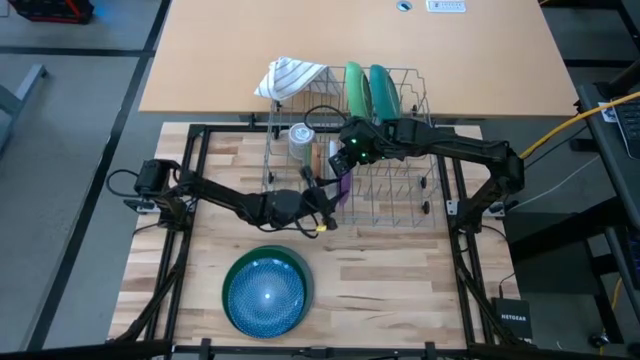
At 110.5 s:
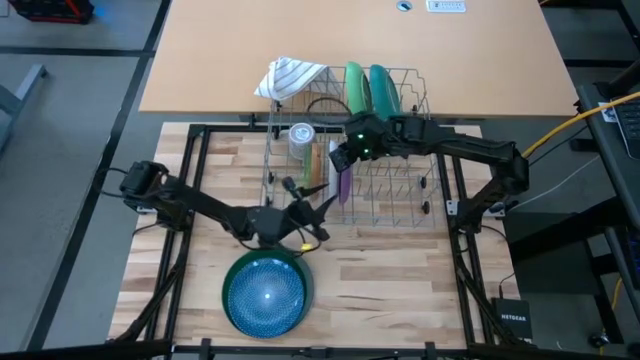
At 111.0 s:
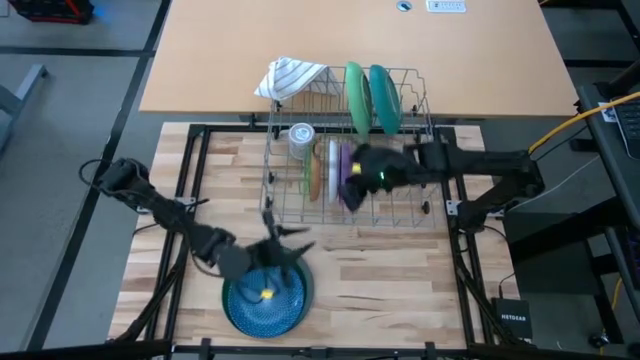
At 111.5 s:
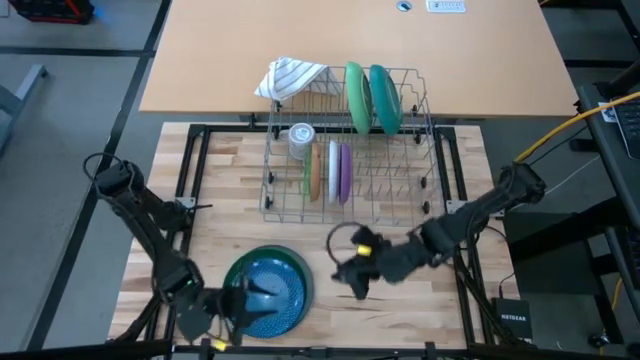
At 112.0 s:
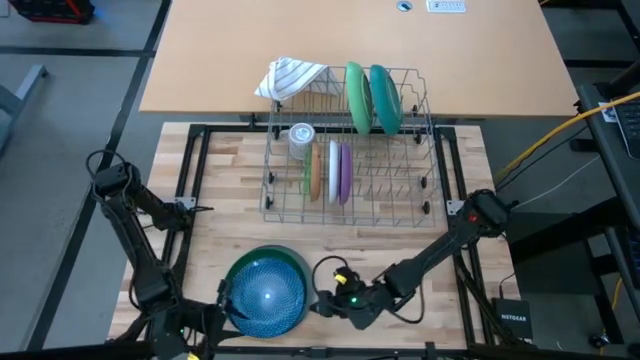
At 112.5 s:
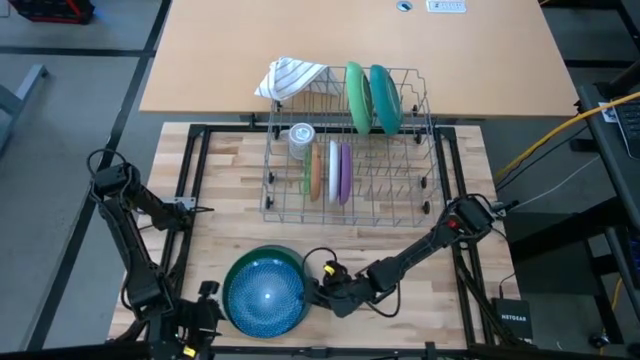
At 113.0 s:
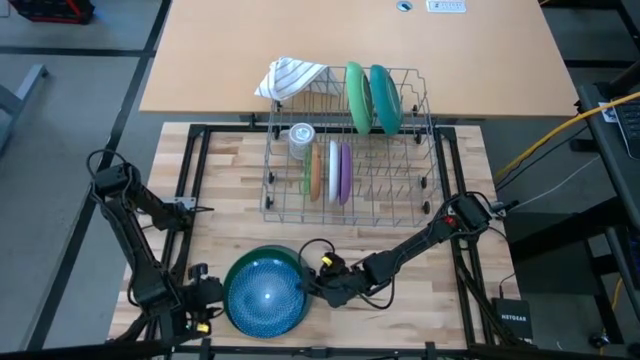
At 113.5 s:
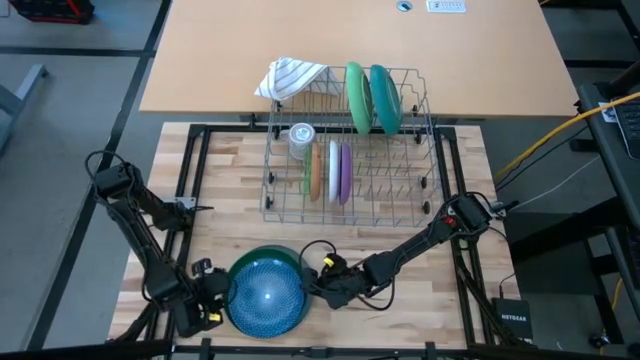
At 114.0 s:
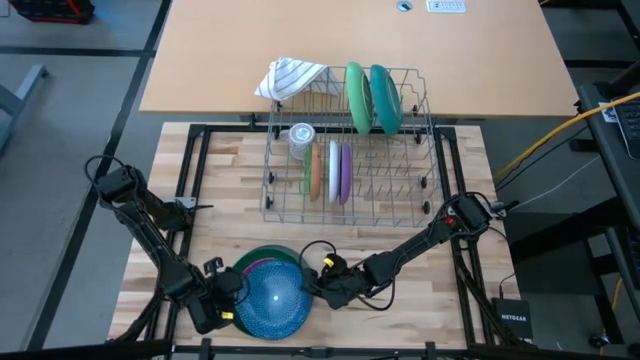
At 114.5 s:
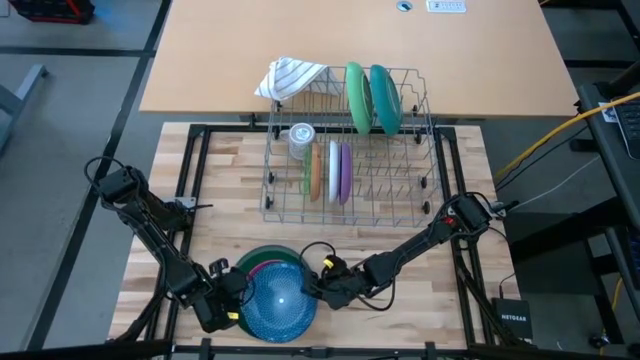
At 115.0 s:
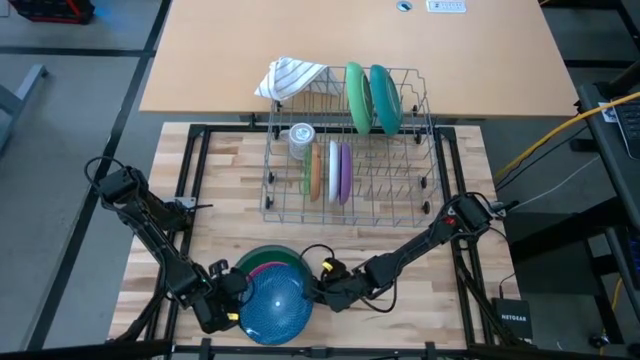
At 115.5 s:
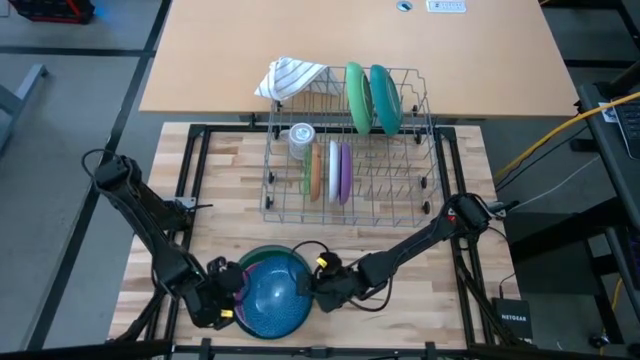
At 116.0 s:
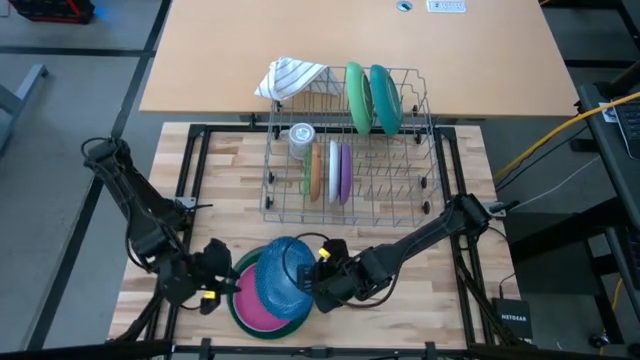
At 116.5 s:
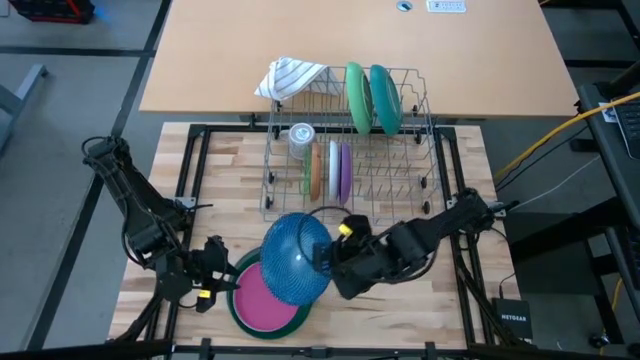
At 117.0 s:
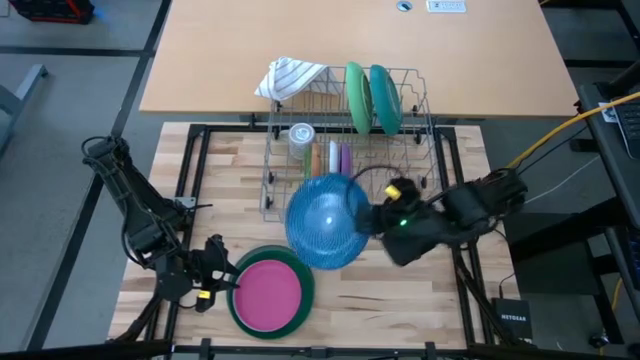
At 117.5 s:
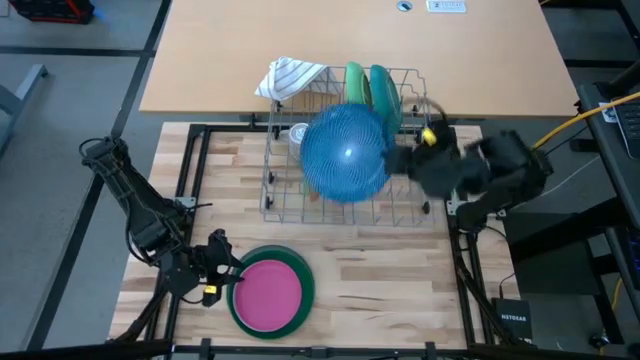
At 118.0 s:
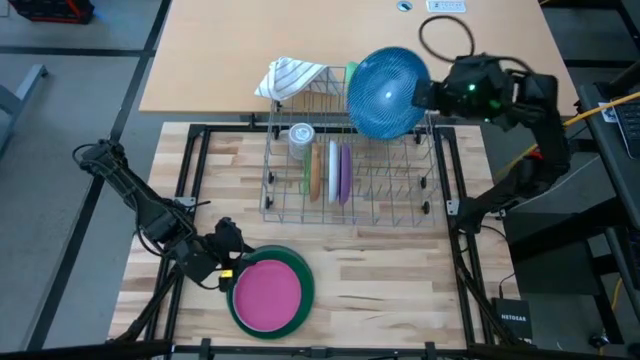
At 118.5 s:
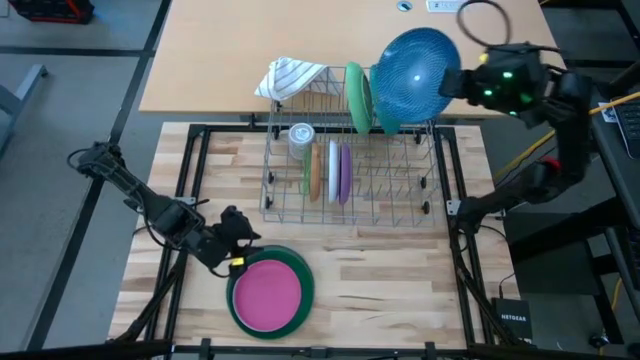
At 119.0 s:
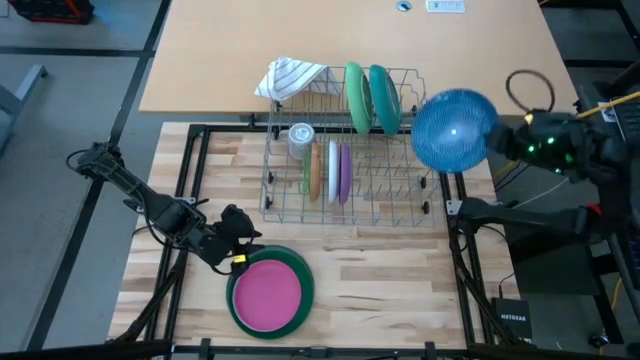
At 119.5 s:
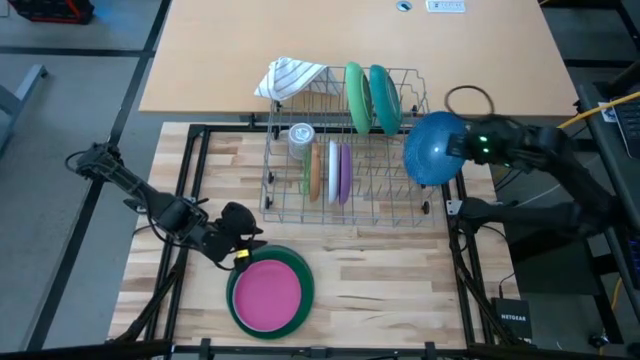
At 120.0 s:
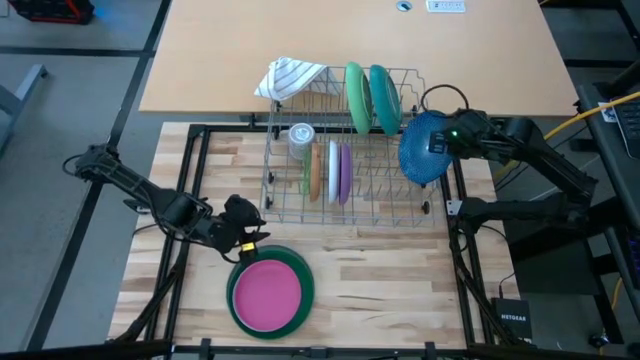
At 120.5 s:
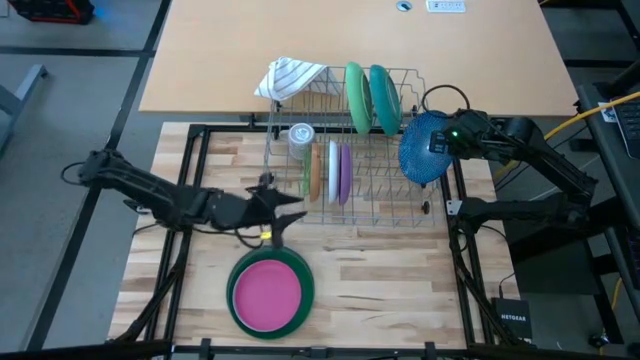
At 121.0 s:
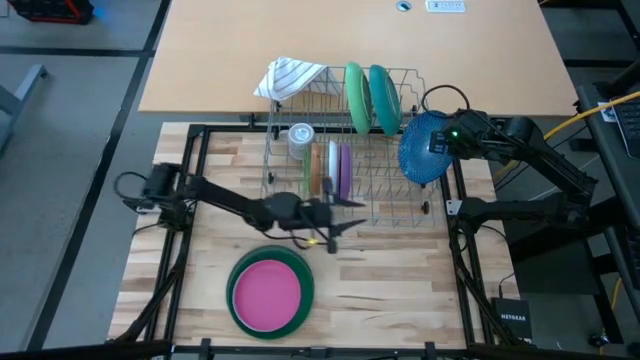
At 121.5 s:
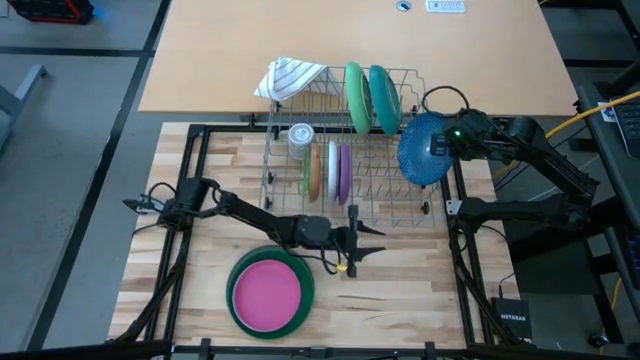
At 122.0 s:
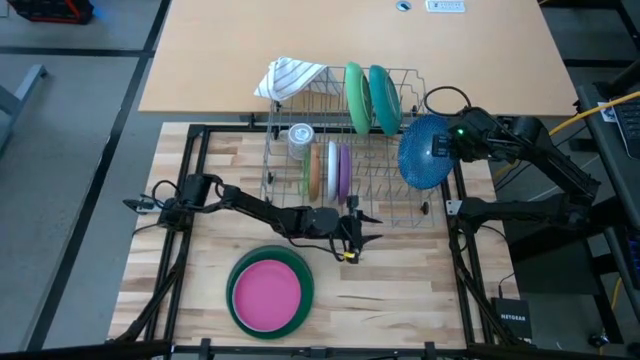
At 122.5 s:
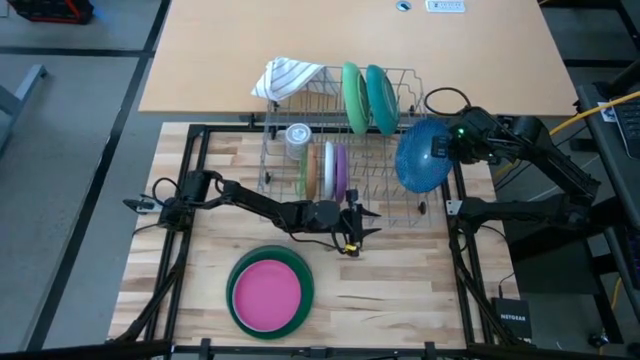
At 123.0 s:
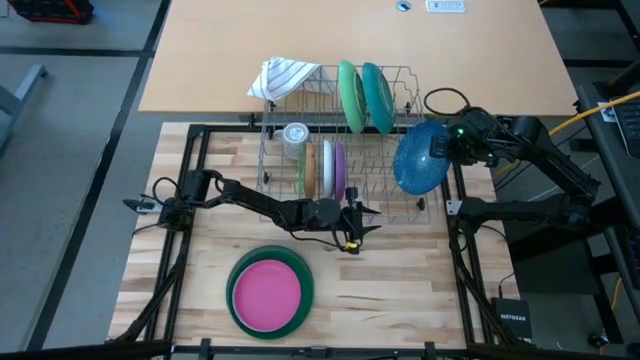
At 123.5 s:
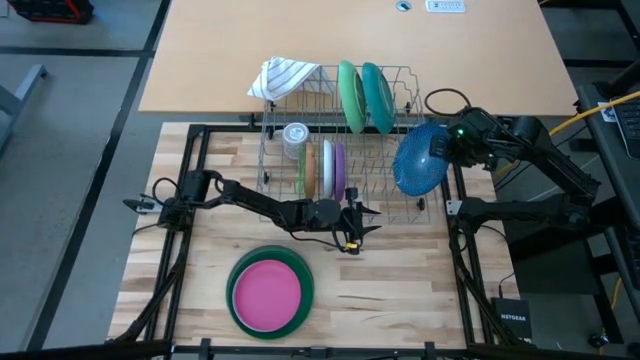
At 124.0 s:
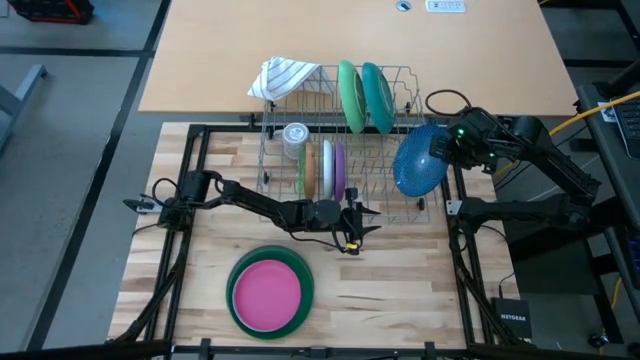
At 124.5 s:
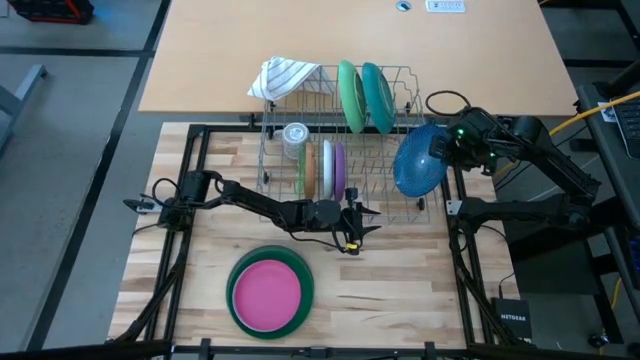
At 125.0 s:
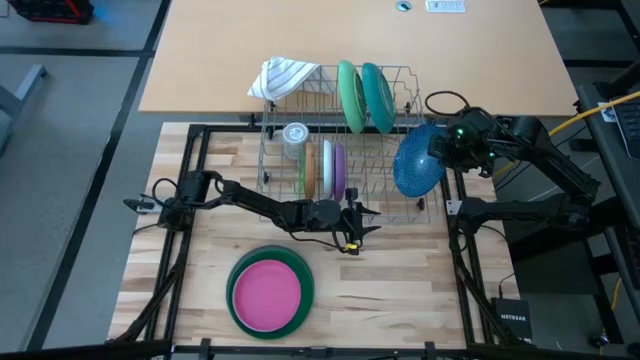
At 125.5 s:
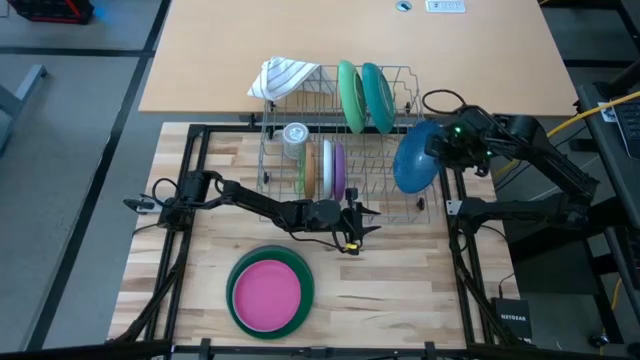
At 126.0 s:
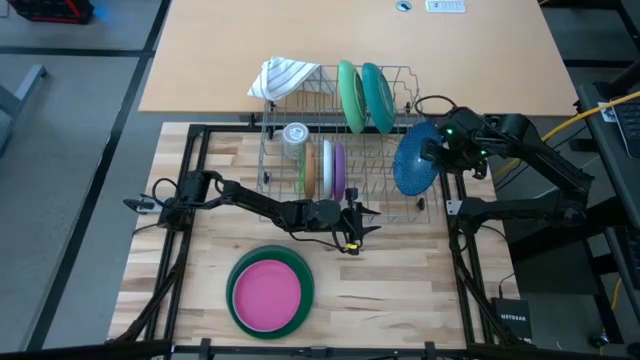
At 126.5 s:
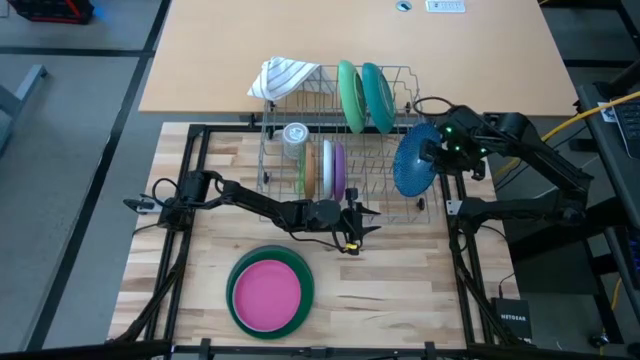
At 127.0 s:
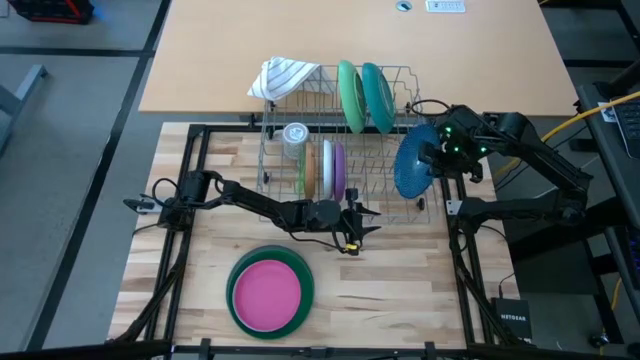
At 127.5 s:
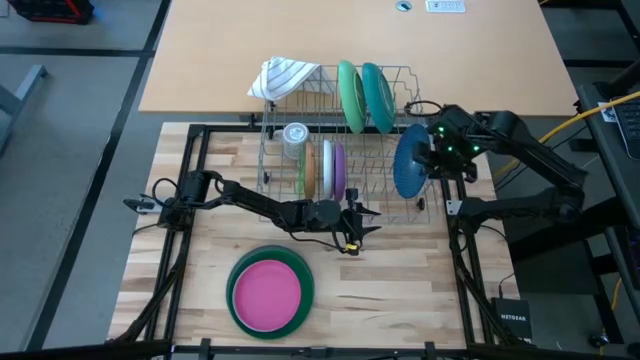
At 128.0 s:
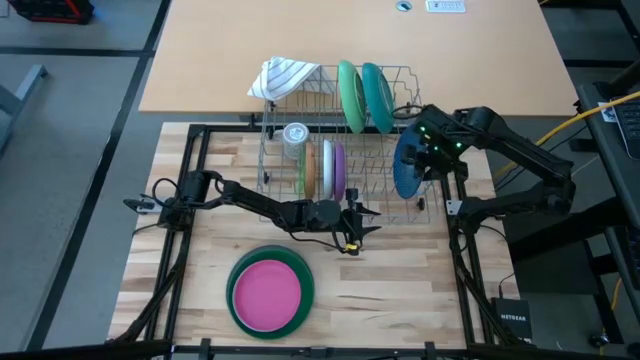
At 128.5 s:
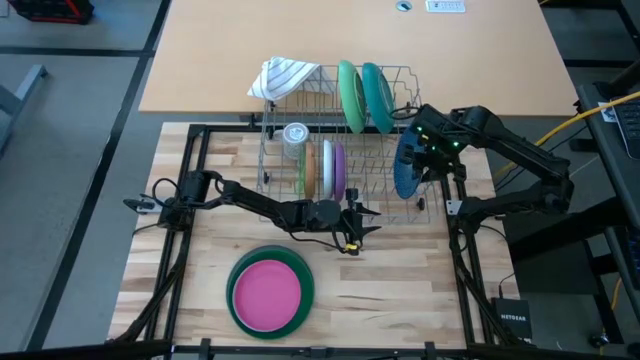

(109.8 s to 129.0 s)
Task: Sort dishes
Put the blue patterned plate in the dishwasher rack
